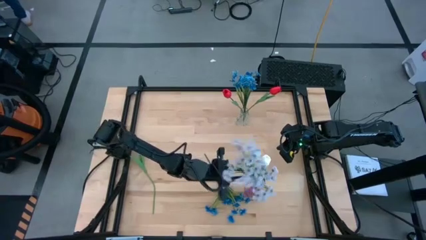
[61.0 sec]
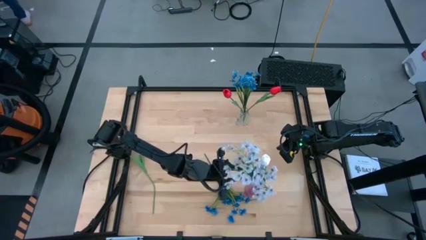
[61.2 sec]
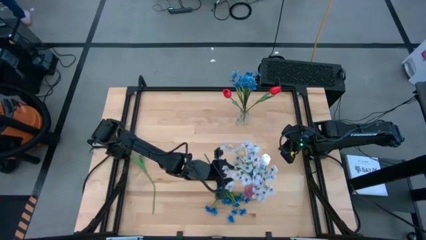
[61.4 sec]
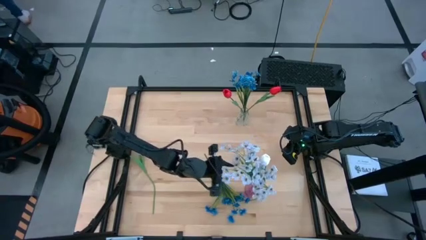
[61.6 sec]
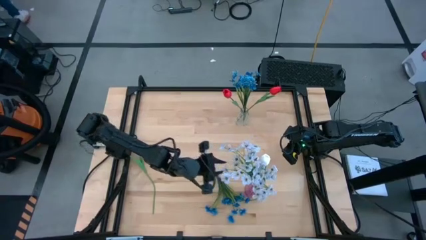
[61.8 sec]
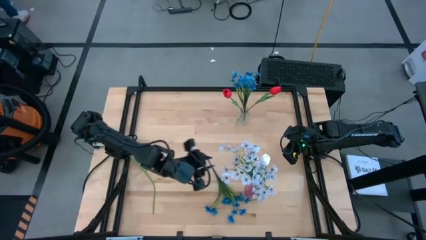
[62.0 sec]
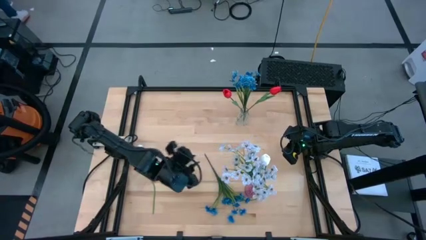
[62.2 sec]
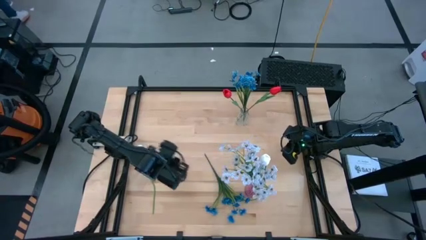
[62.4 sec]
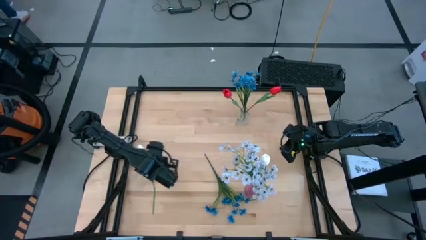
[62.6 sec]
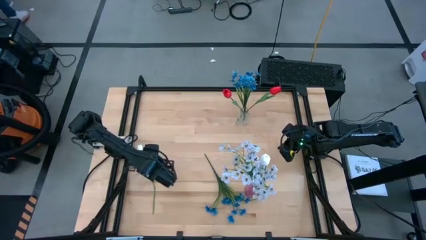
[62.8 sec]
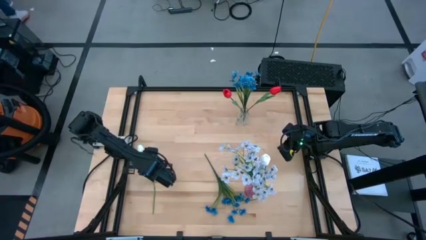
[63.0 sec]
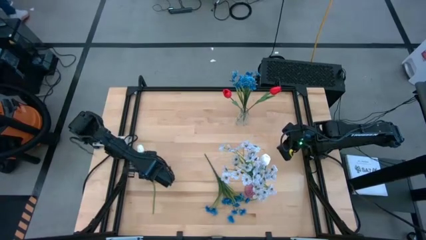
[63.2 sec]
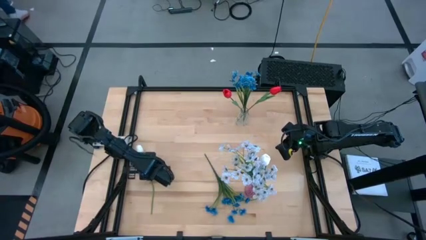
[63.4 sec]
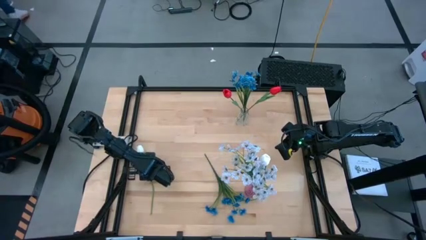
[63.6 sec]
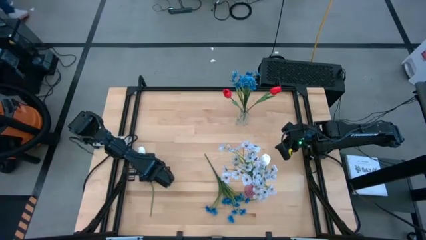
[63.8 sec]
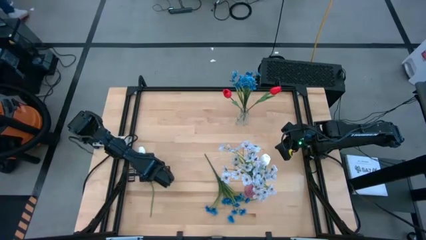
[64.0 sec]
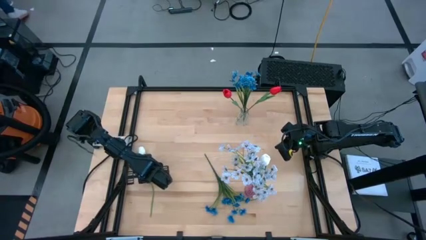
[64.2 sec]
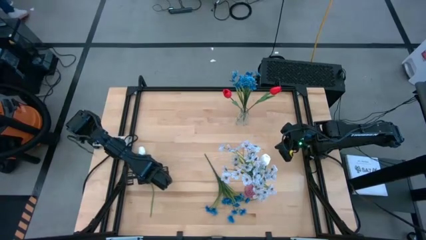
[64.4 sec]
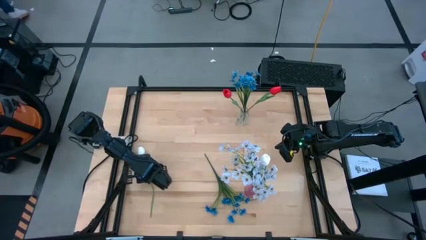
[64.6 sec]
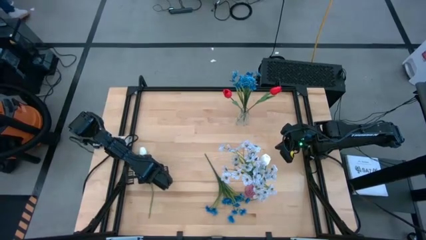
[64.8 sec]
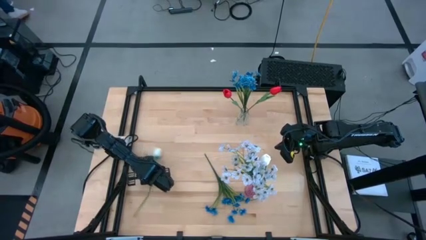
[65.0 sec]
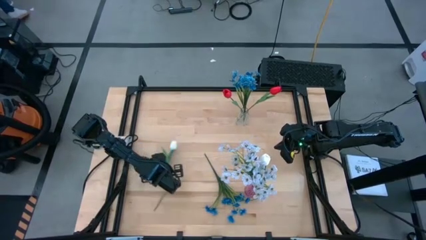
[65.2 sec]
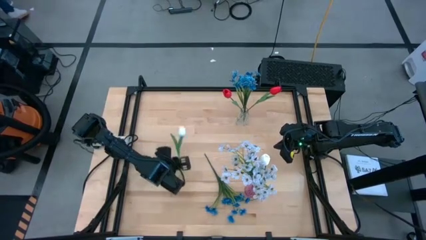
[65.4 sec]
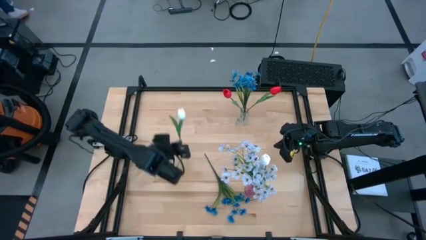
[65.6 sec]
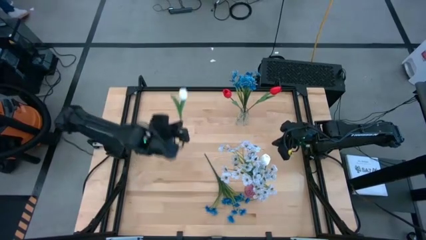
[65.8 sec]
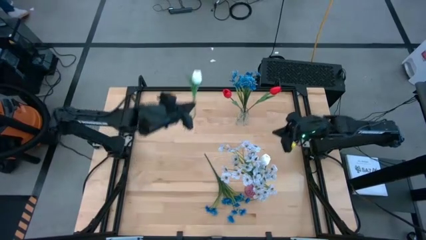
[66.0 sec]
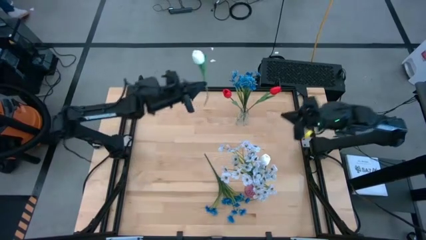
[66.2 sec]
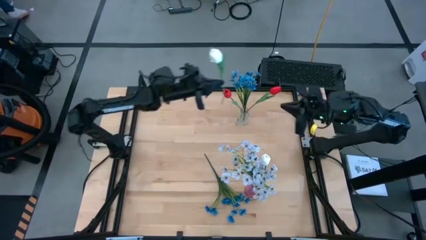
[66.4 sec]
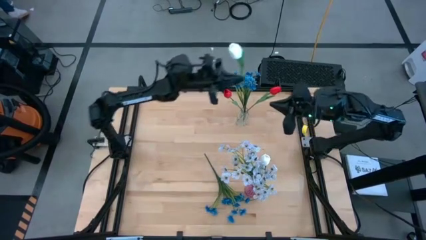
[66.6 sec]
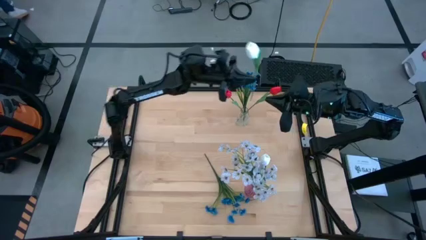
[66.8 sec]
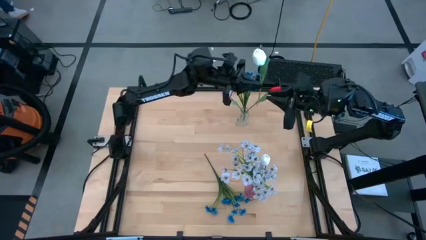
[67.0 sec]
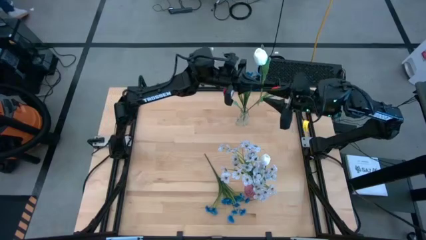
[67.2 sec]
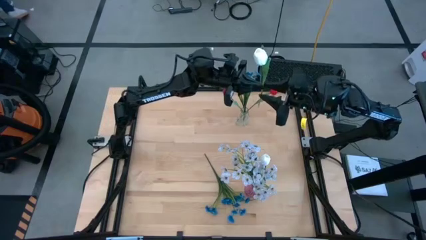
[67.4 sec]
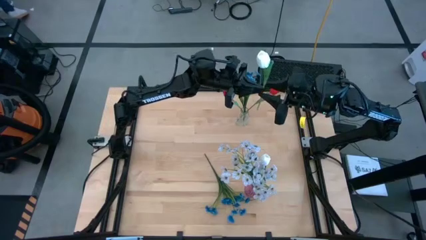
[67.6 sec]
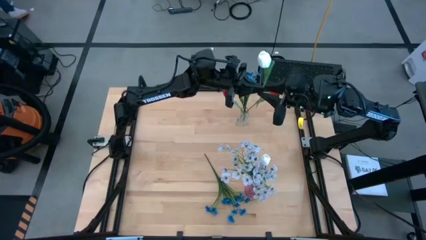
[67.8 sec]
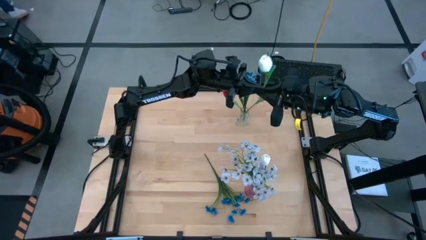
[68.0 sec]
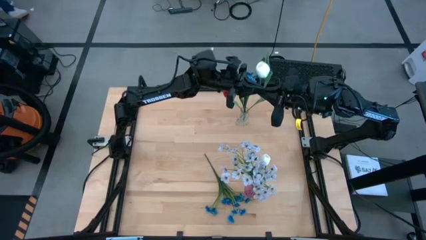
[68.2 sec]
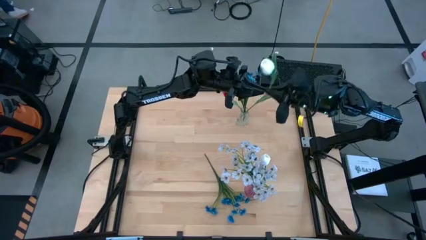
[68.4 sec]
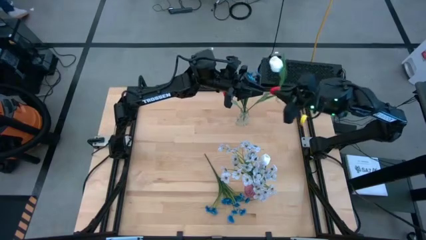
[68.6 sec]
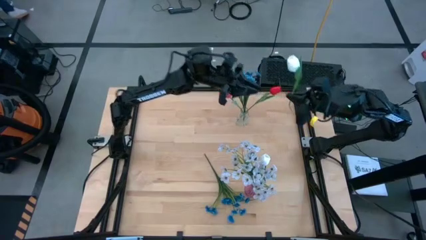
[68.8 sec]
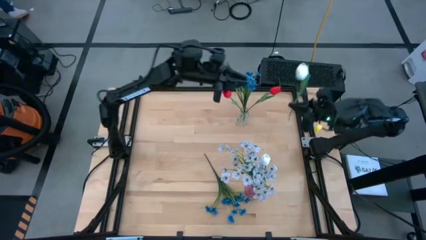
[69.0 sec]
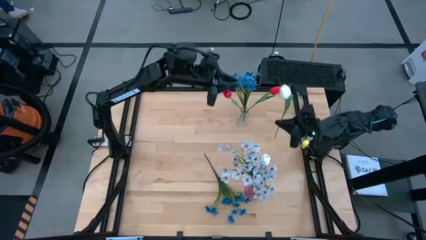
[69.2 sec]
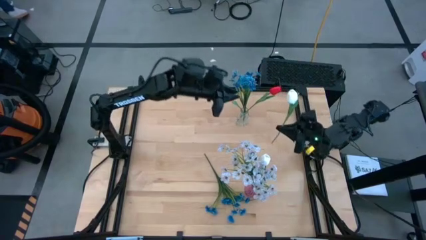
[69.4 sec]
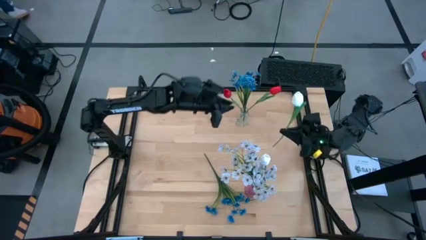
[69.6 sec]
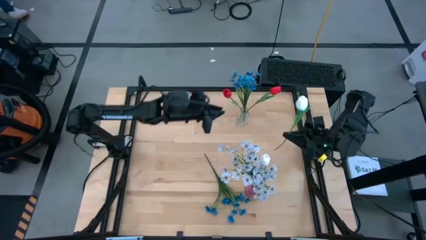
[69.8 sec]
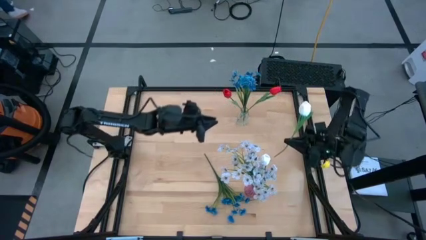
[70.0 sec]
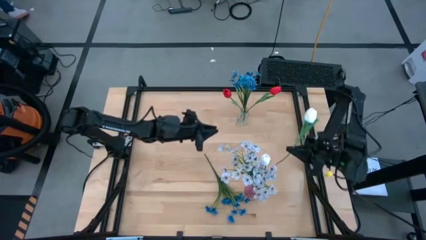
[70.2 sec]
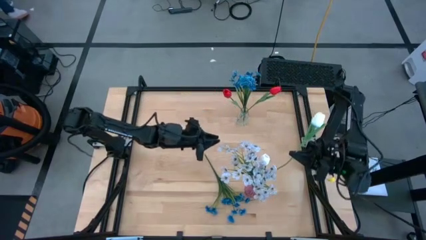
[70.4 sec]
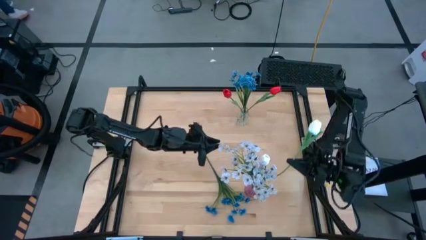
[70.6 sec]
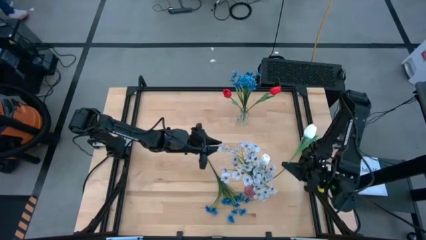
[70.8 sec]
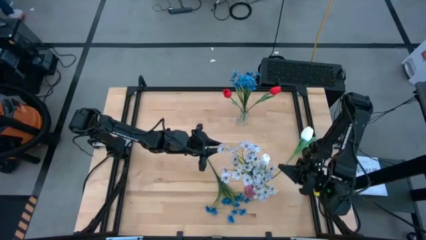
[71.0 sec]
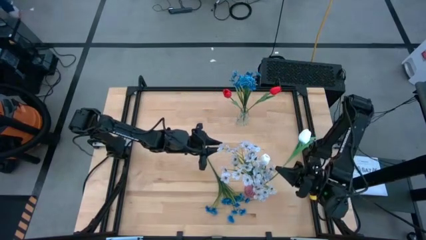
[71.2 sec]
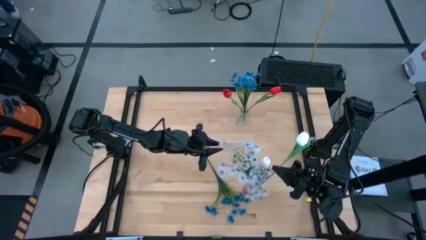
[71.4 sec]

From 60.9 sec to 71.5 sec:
Task: Sort flowers into vase by color
Put the white flower into the violet transparent vase
